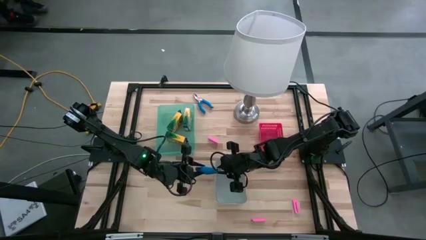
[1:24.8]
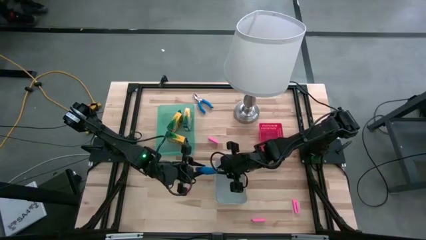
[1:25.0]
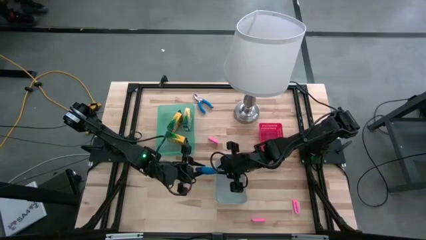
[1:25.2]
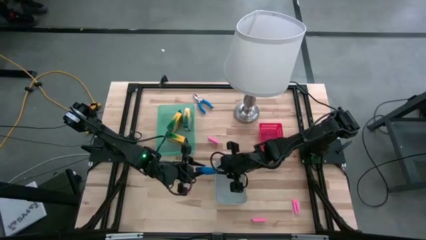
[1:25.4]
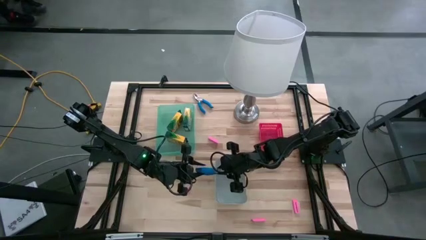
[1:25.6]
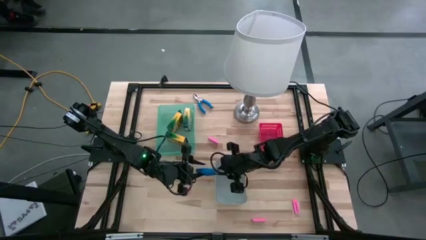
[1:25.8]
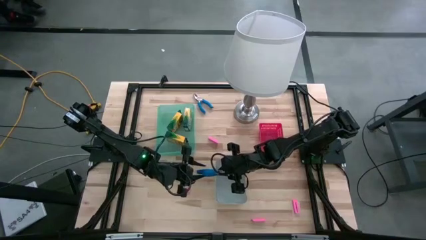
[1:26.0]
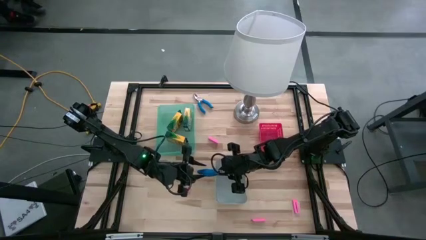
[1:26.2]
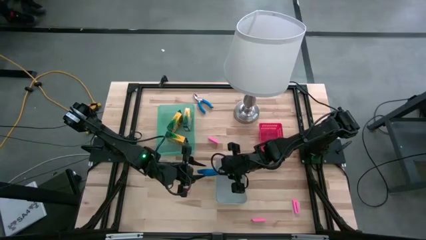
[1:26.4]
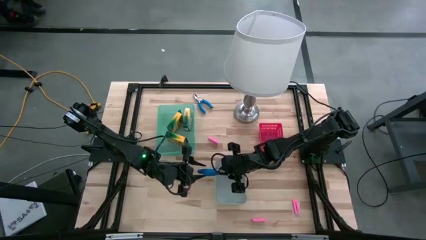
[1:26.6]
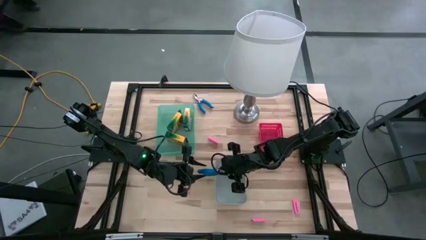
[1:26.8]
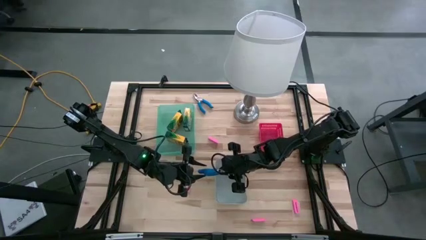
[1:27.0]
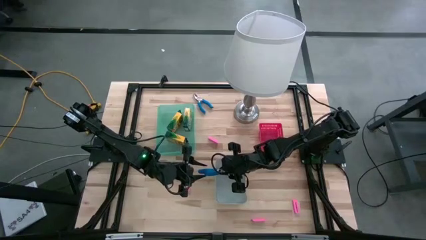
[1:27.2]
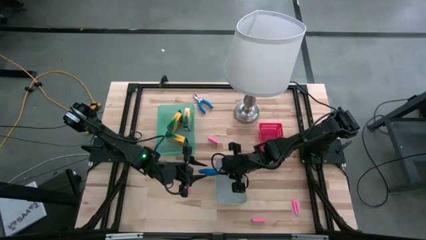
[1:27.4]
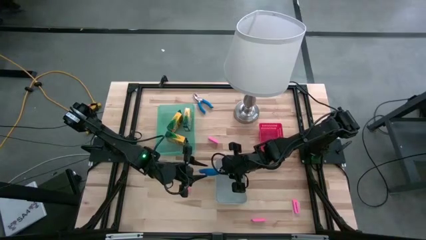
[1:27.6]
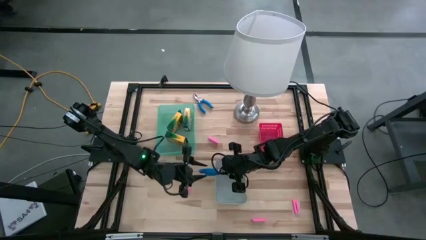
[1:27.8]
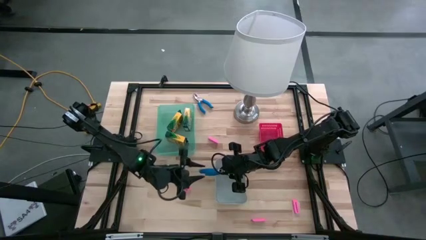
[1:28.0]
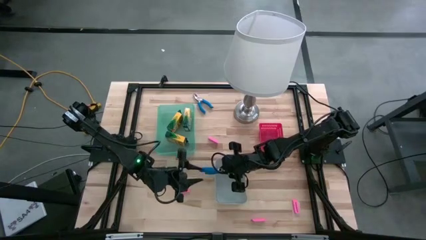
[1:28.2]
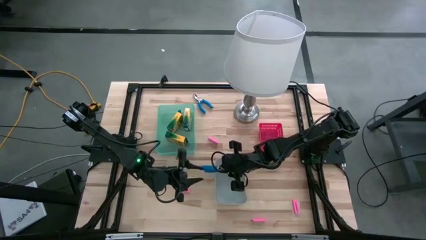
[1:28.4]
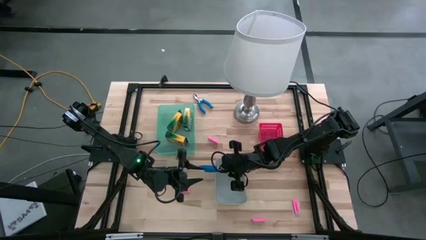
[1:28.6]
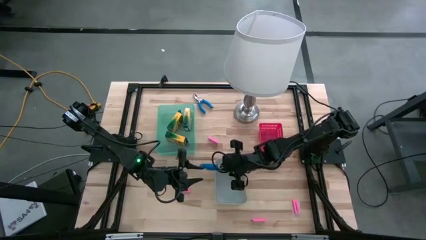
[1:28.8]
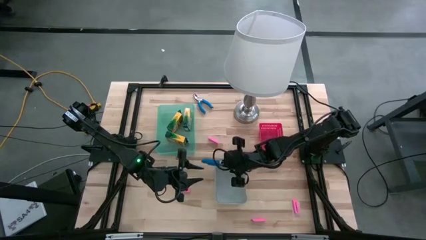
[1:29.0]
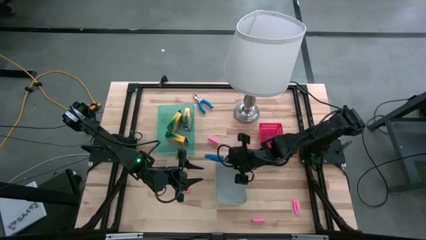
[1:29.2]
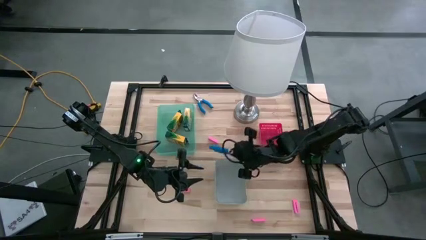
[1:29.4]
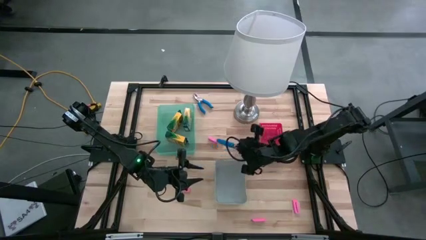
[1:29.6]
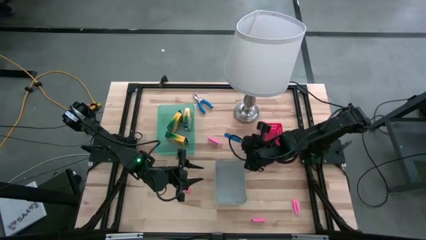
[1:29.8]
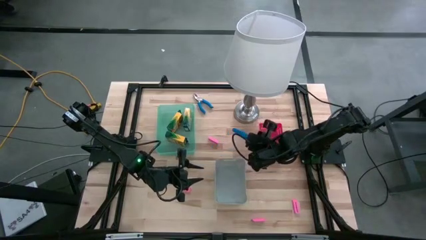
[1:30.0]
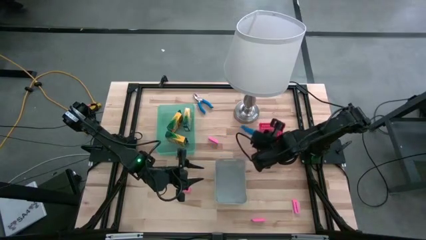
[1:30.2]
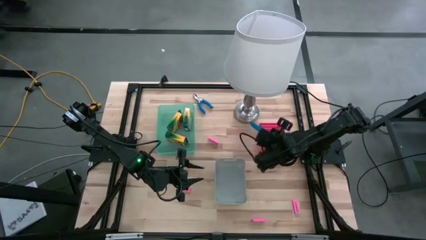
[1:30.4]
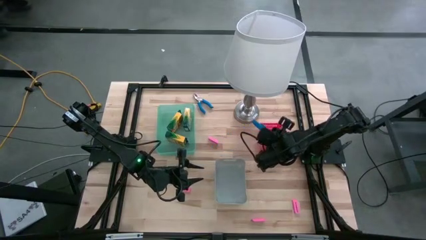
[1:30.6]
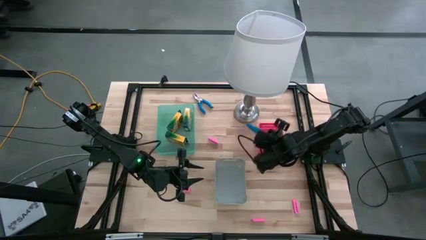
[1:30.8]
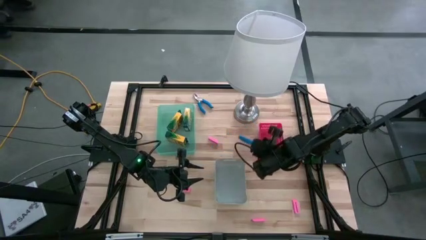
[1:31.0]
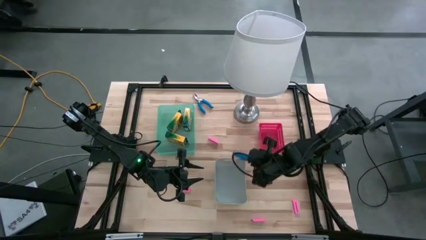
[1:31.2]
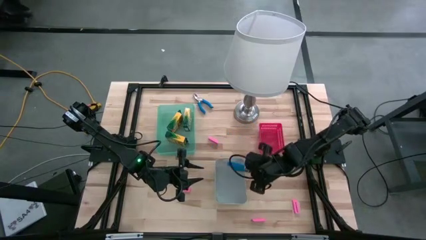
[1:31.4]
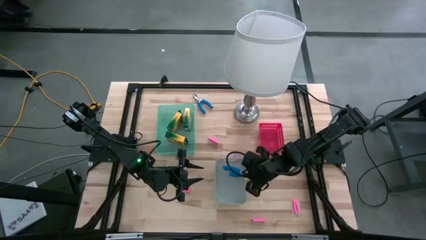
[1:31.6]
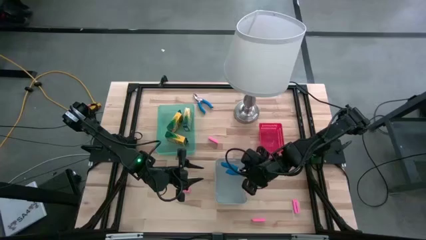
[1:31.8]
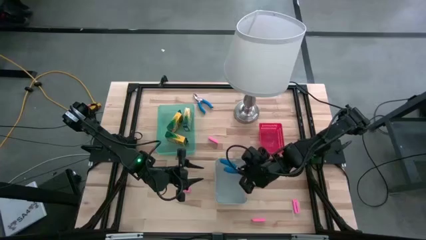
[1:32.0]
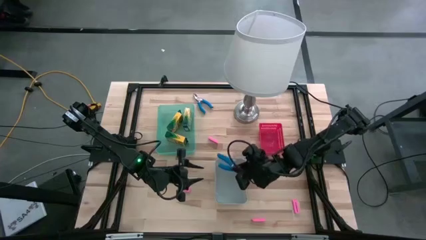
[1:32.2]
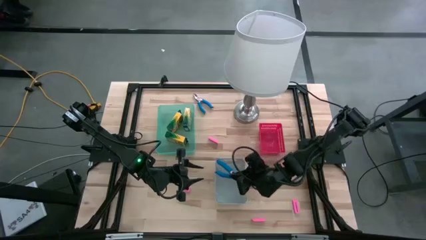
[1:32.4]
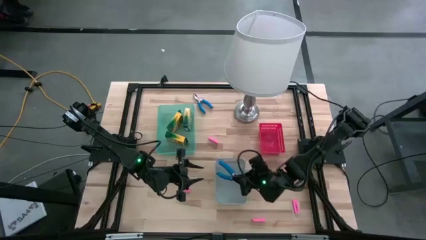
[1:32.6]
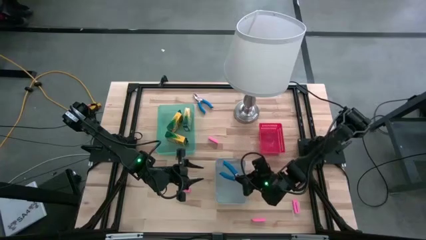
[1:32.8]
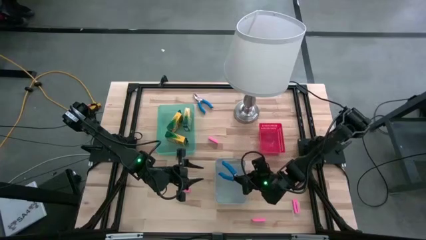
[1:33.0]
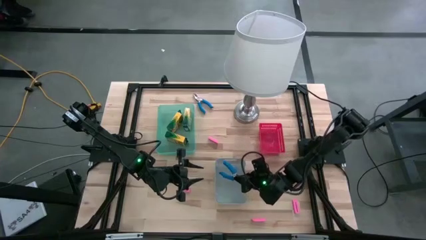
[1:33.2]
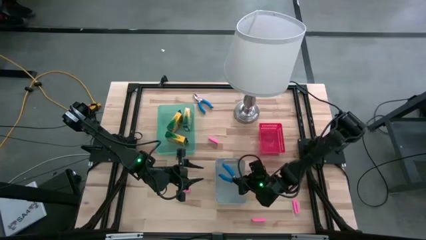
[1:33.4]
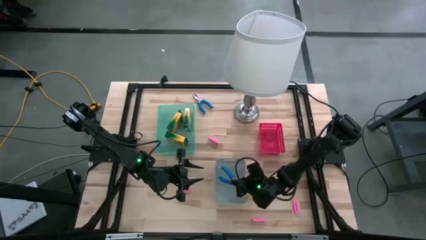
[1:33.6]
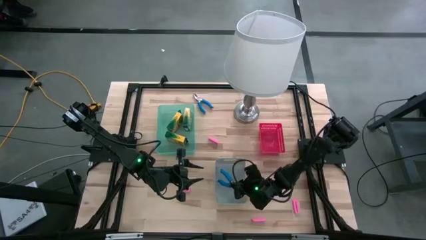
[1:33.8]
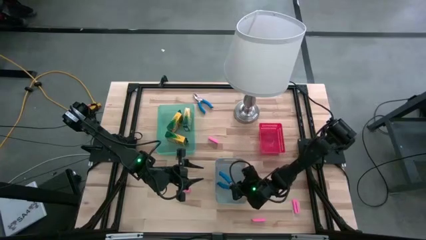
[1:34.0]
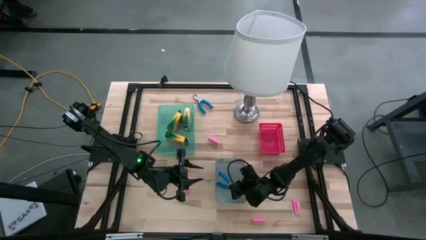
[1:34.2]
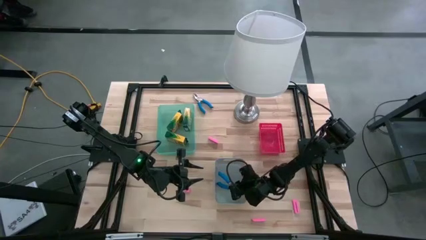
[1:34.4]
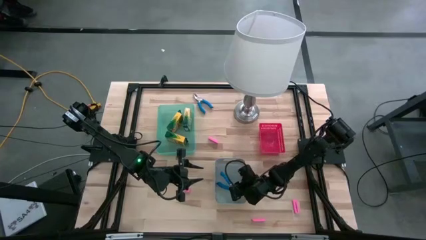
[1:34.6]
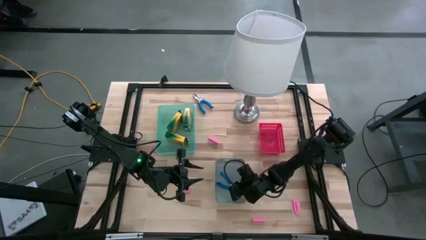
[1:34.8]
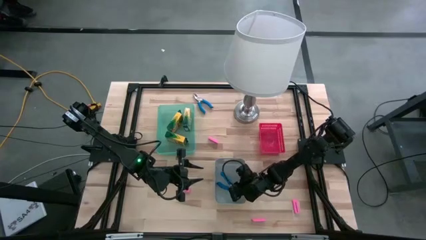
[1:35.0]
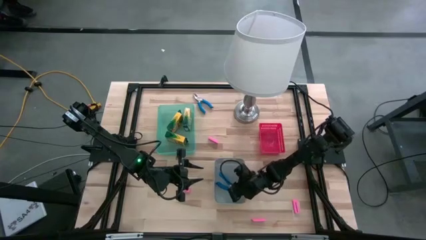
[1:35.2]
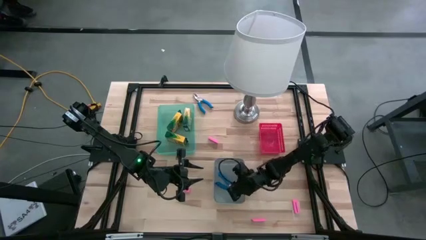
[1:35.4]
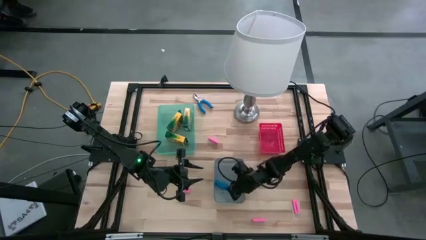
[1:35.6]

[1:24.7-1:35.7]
Task: Pick & Place School Supplies
Put the blue puncher into the gray bin

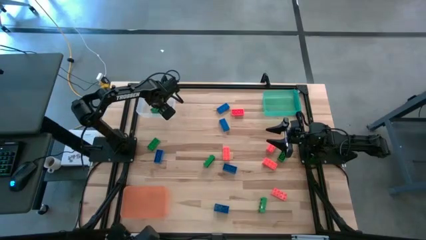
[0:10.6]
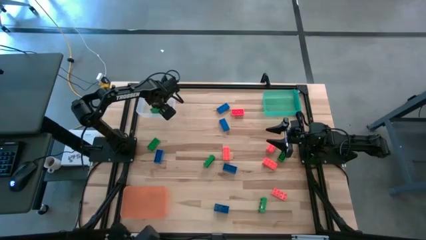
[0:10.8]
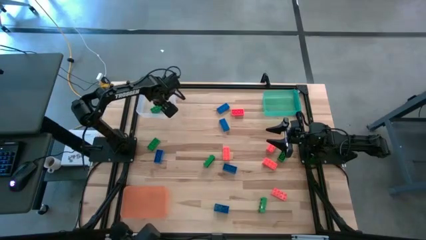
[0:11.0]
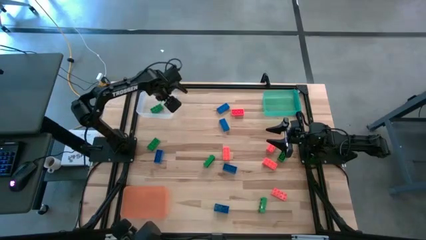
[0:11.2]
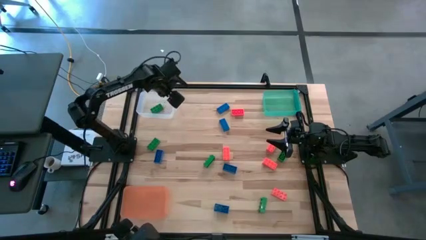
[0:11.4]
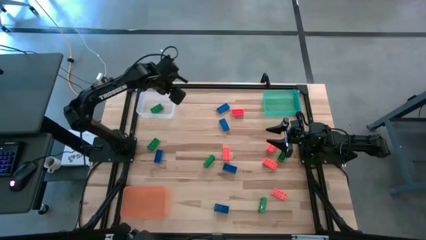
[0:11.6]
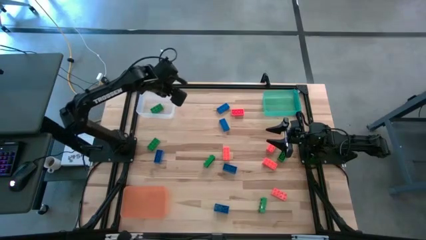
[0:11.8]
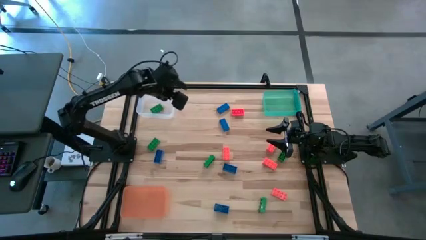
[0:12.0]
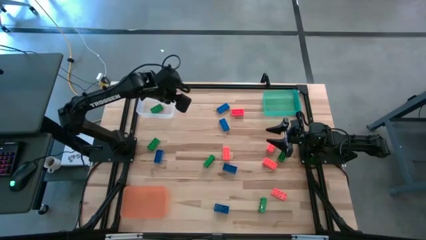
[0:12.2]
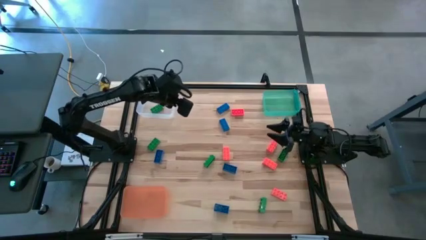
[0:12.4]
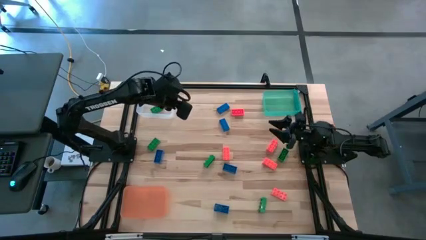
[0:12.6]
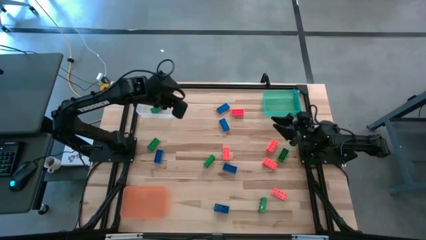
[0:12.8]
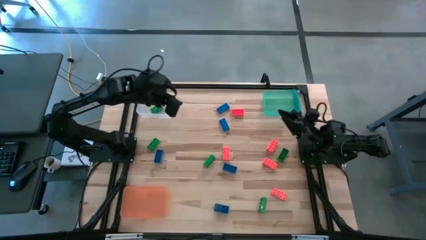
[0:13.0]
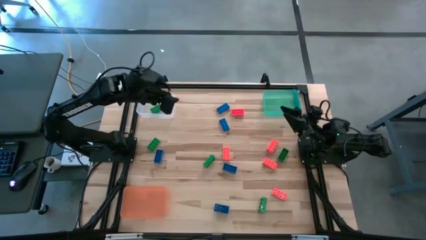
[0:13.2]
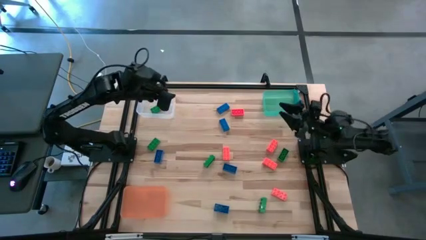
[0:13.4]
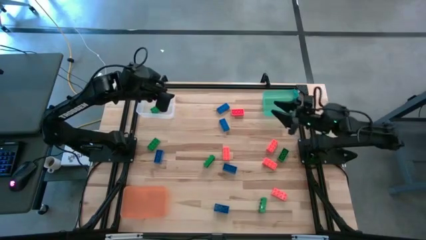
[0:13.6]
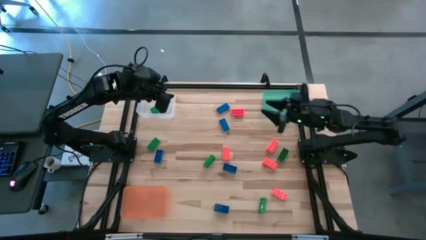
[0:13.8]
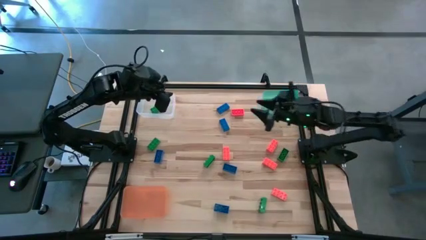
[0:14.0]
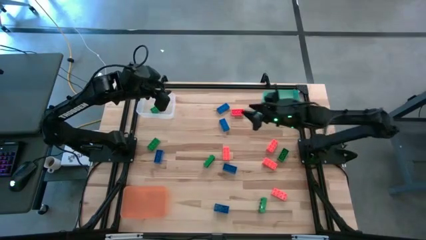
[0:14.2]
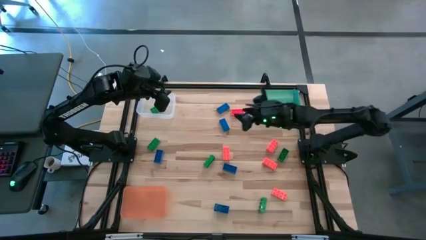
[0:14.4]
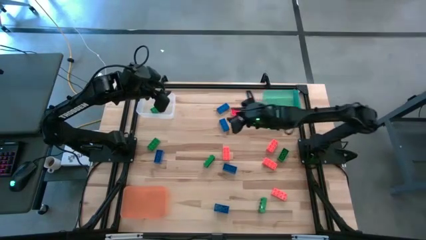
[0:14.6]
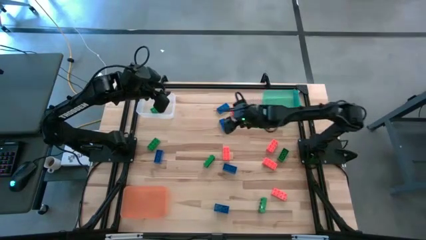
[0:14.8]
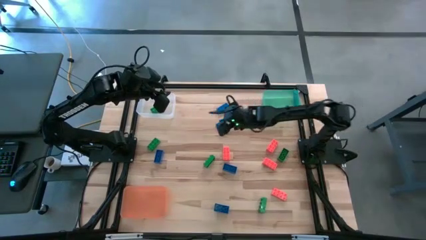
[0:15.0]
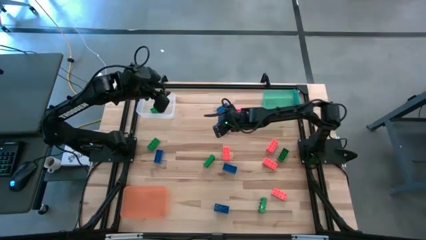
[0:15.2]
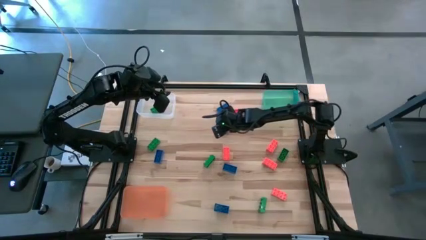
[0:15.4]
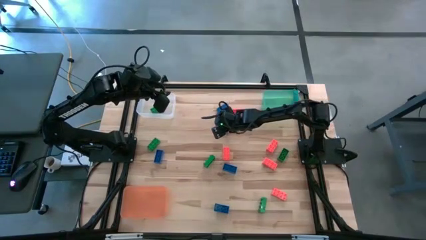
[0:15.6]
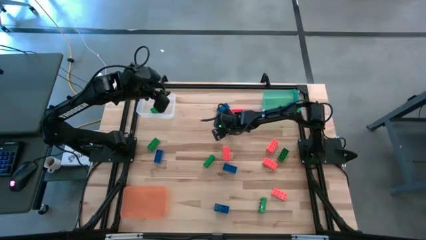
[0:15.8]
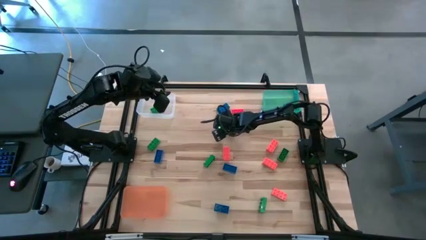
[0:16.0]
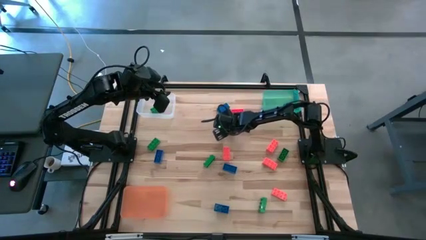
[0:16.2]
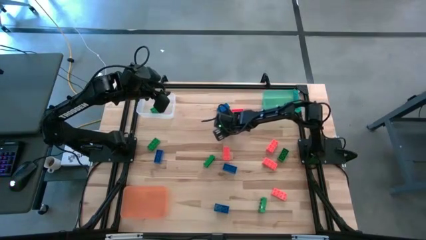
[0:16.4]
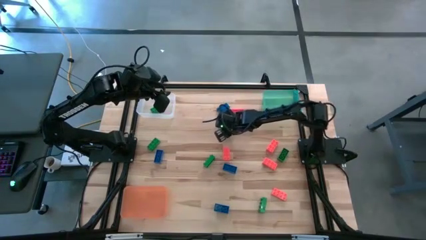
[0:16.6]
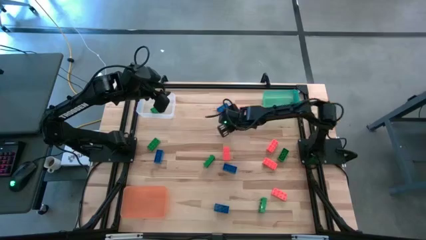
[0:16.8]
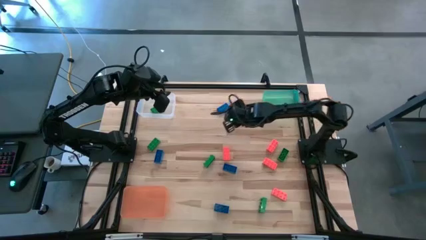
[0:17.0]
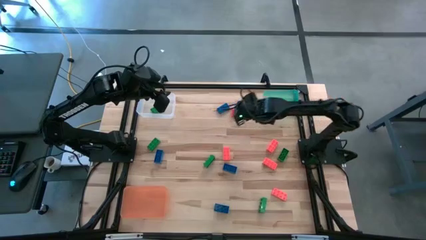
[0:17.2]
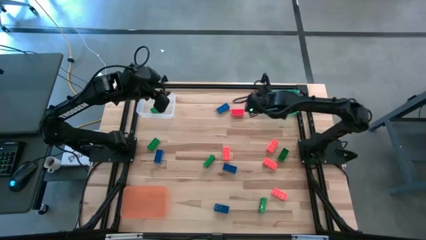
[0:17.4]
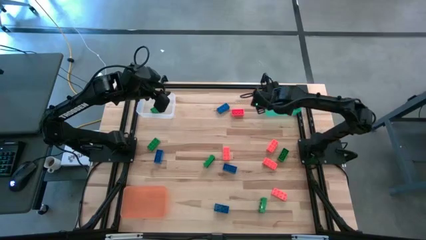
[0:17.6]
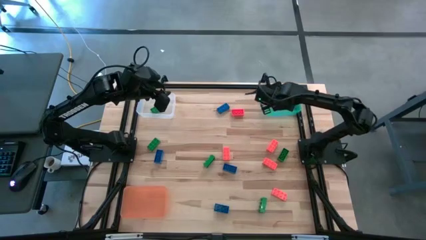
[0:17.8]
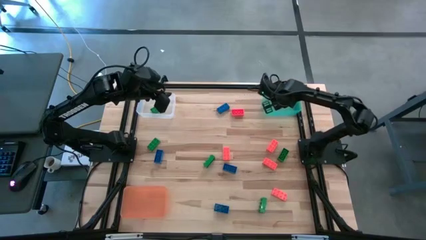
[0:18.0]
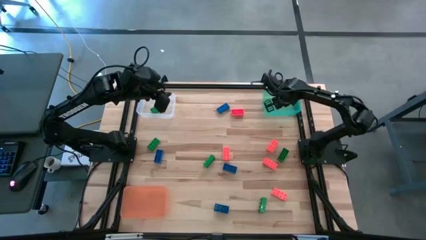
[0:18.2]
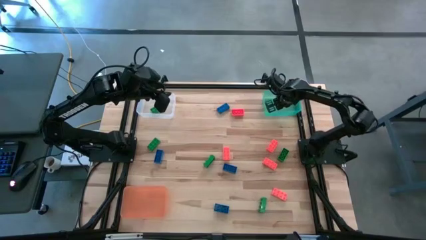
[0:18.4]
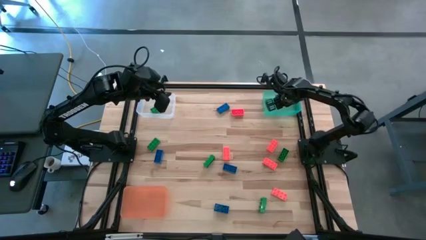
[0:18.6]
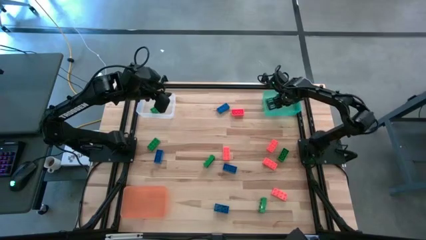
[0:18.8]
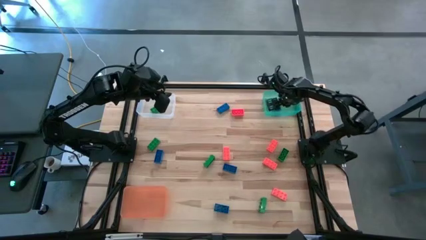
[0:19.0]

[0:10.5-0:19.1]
Task: Sort & place blocks by color
Put the blue game piece into the blue bin
